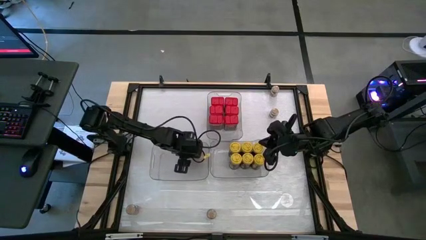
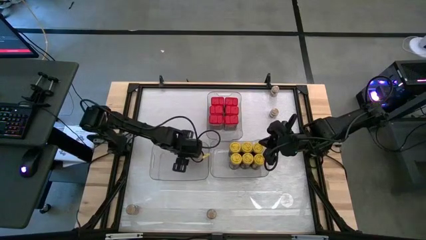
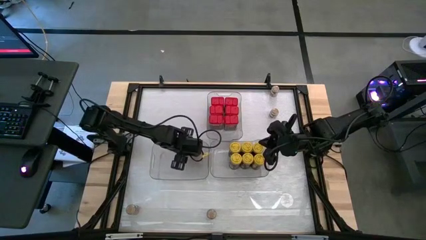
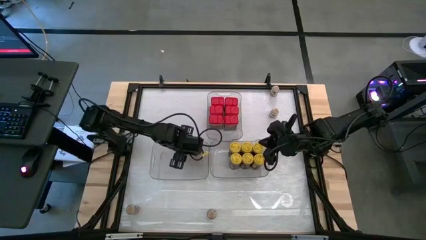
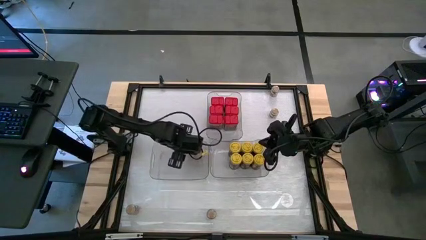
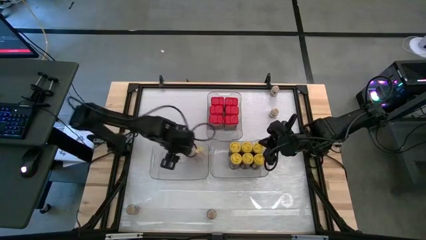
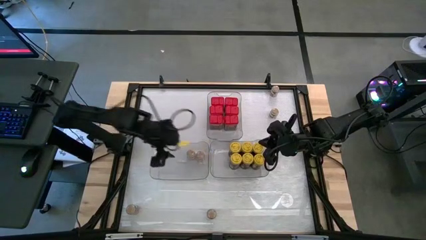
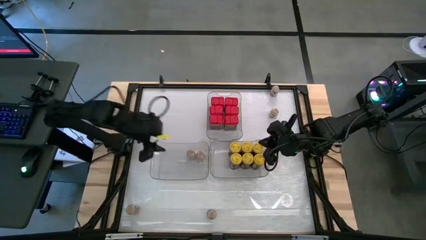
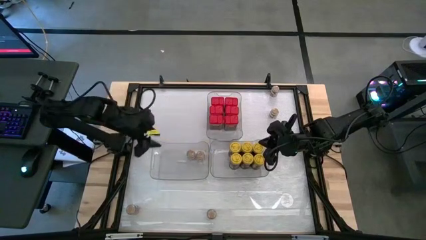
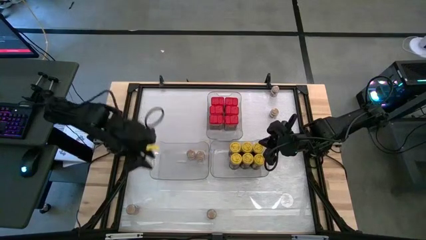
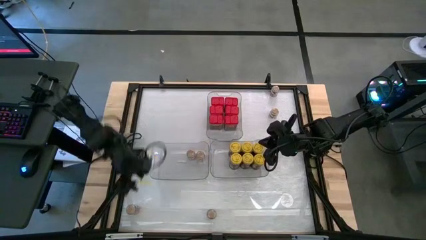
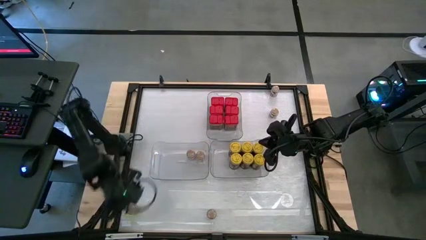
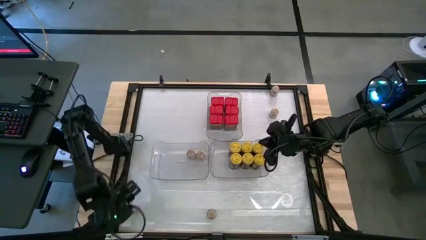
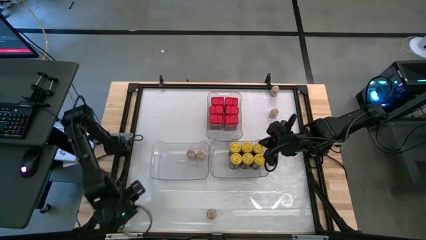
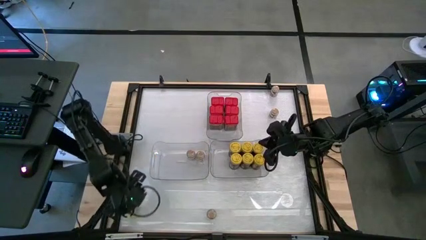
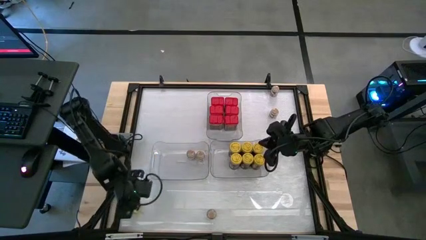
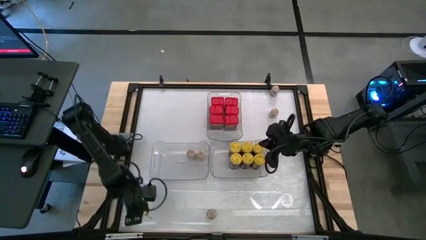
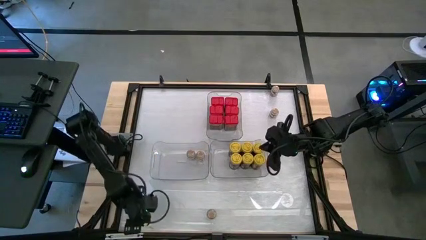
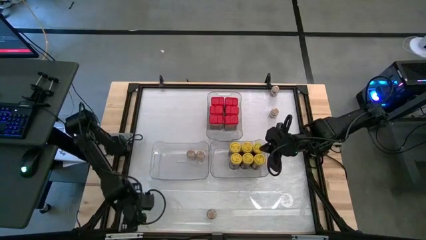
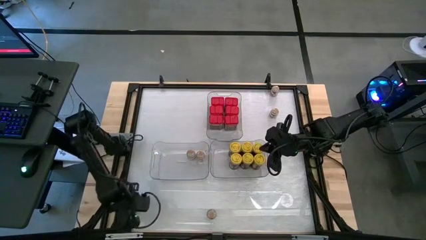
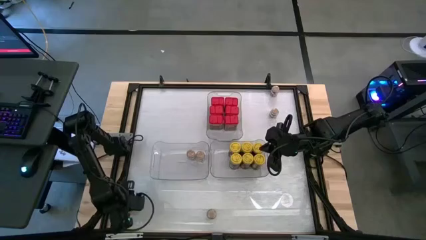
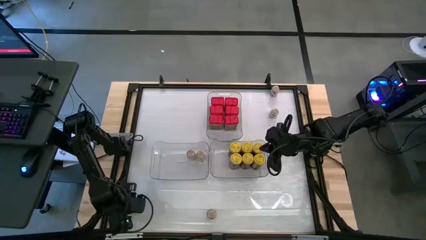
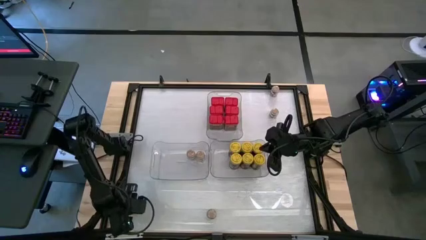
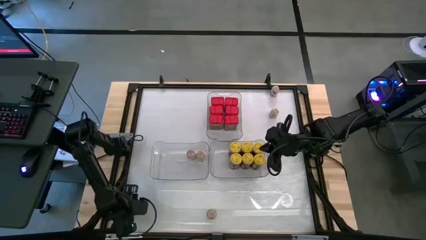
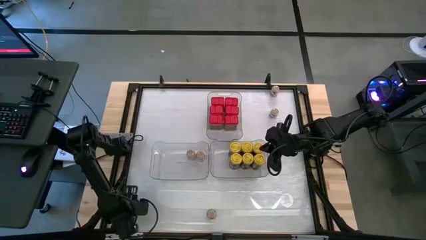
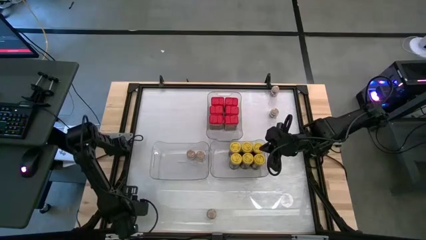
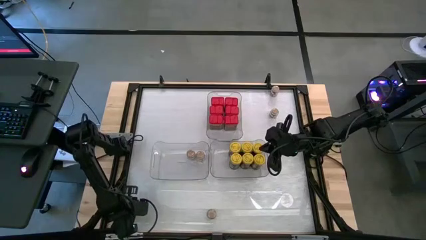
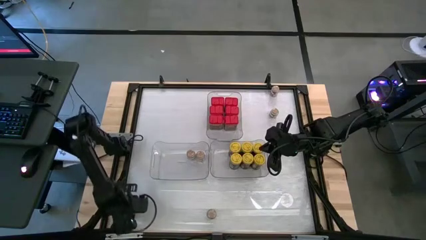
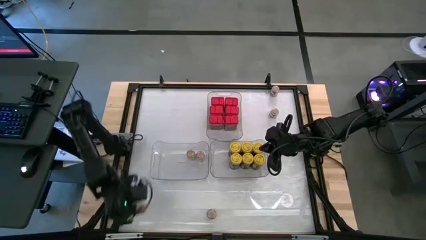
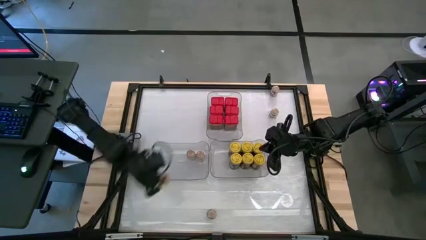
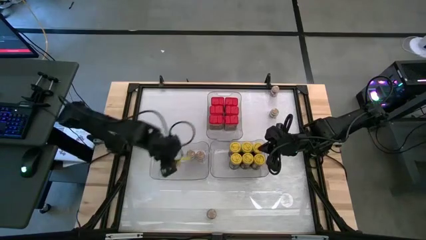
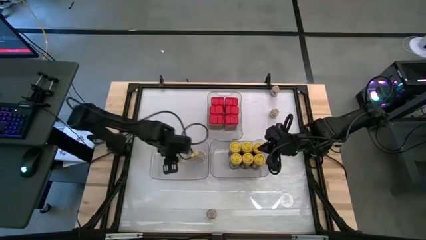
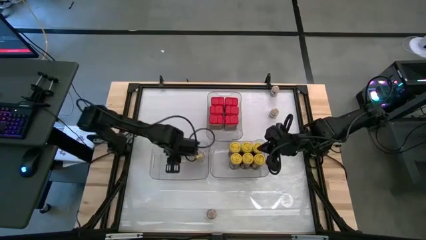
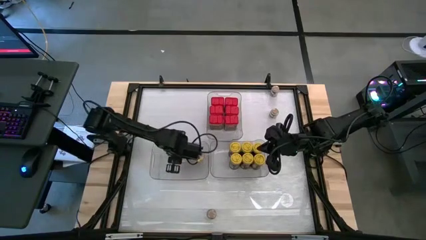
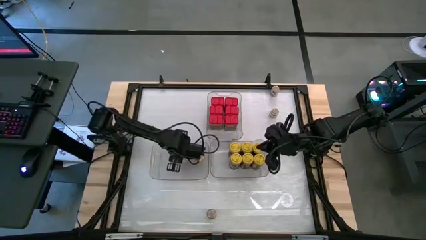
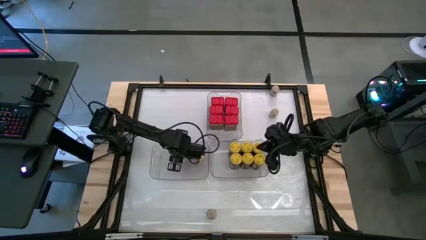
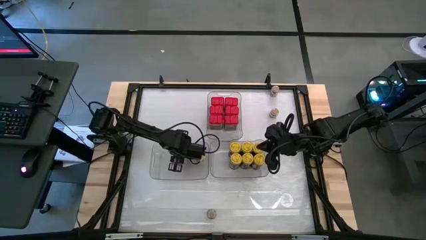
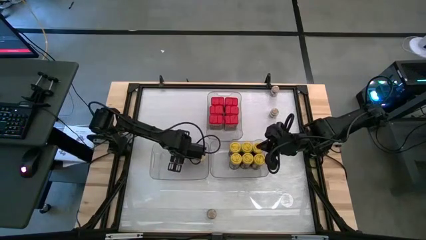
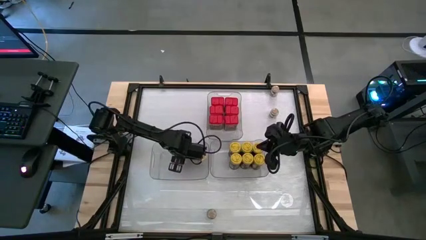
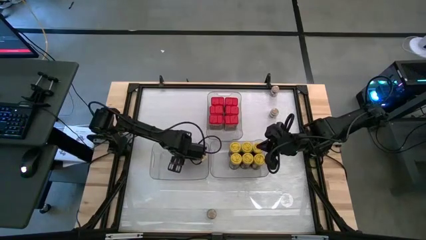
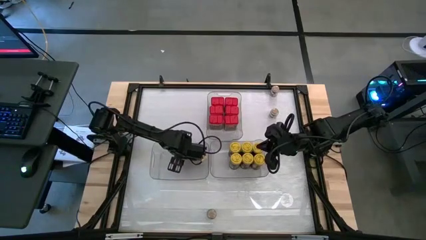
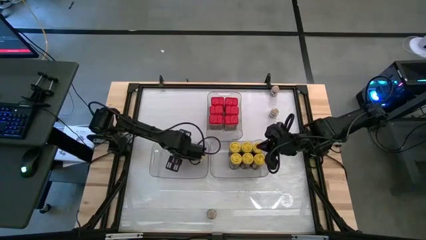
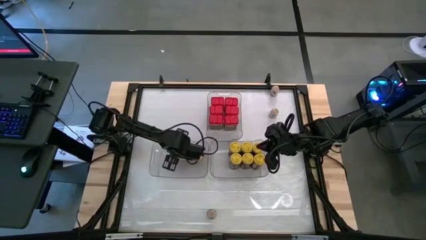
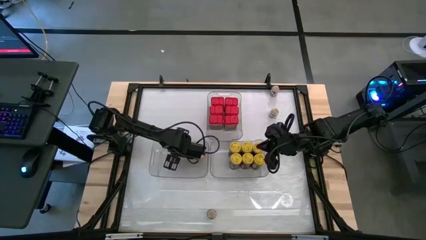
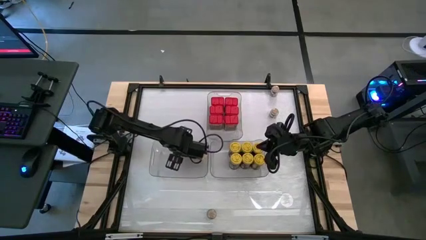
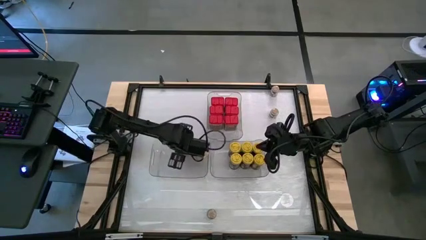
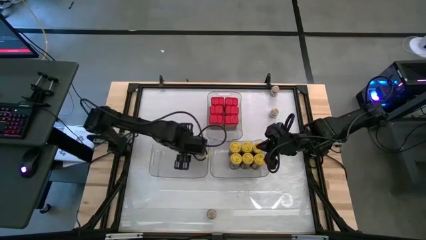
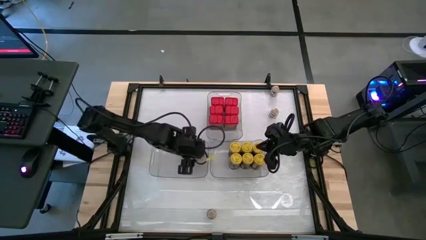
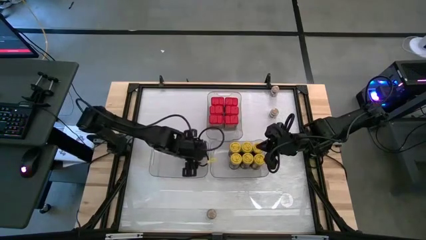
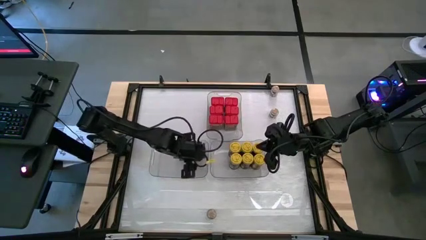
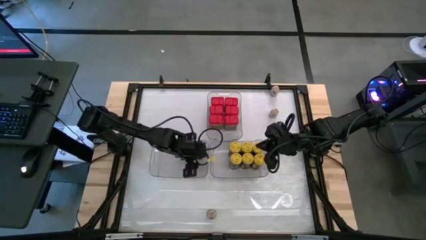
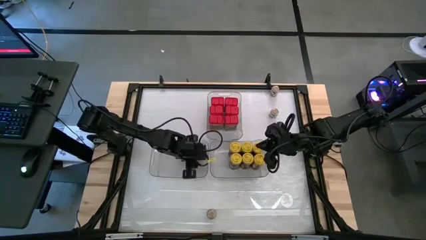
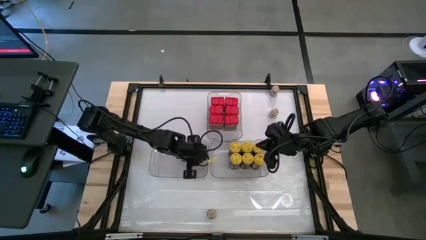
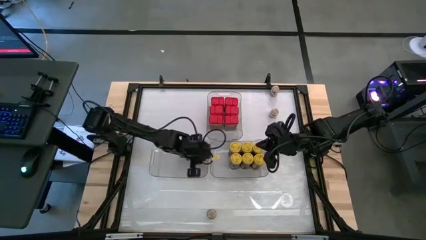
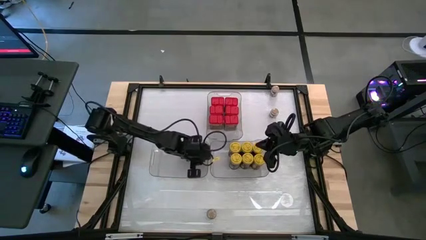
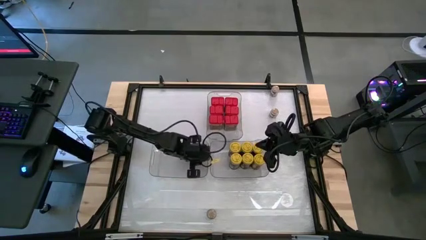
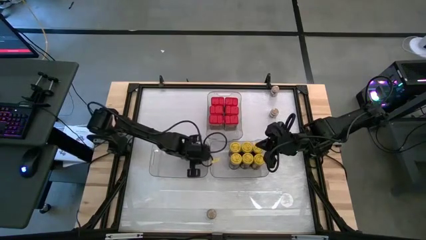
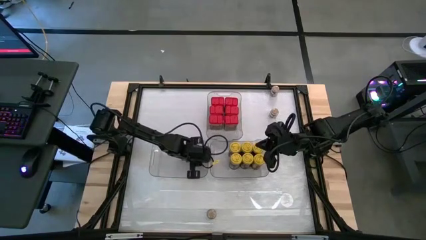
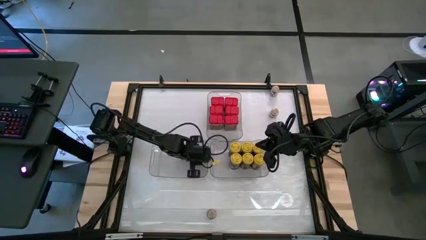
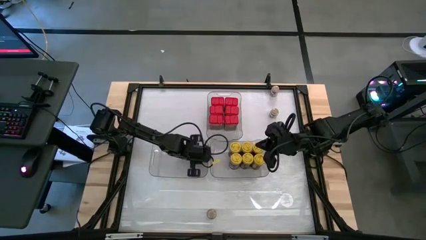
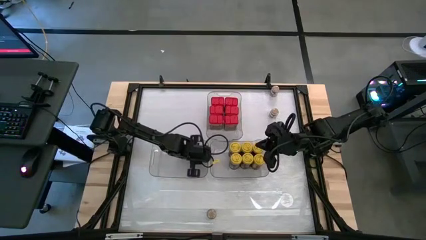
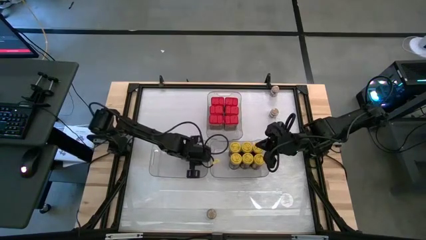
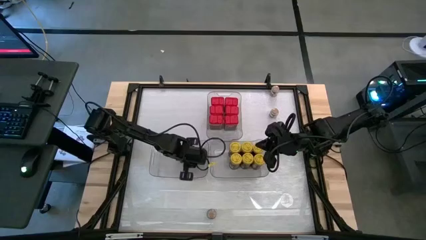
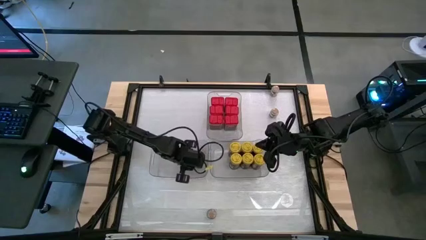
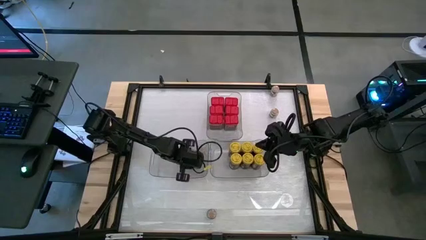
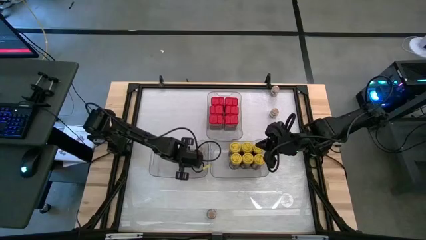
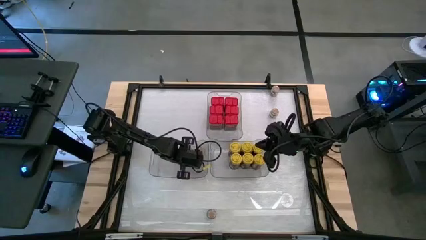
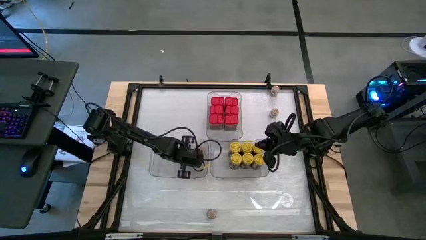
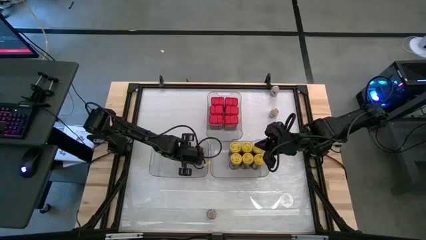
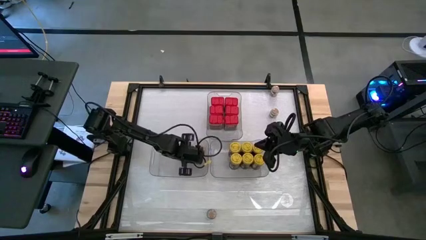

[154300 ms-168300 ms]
Task: Sort spices by type
Put the brown seasoning bottle into the bottom left transparent bin

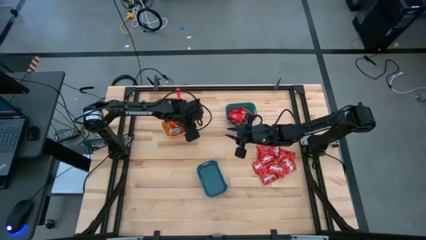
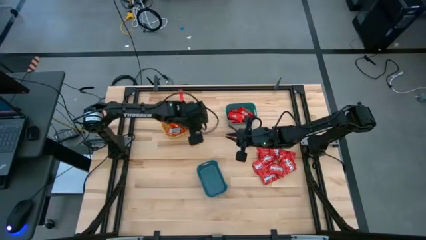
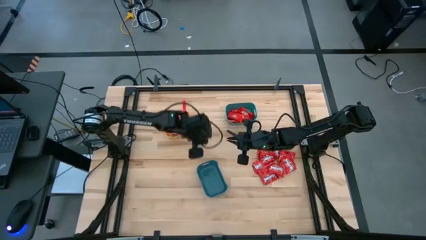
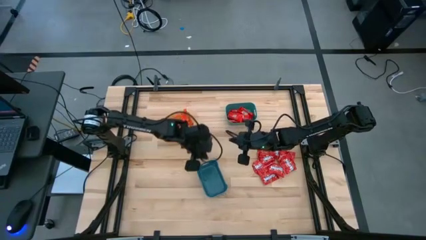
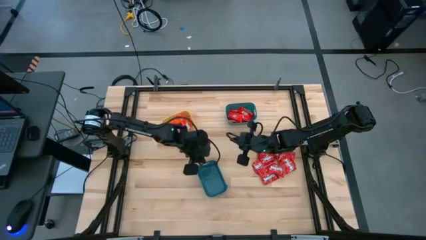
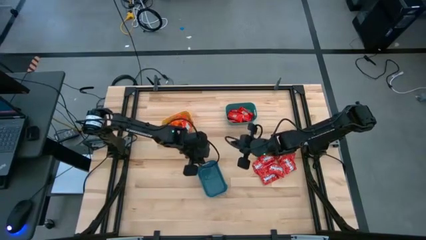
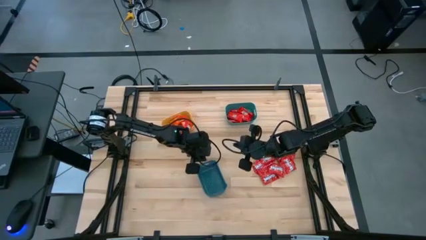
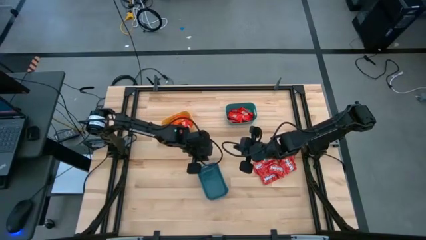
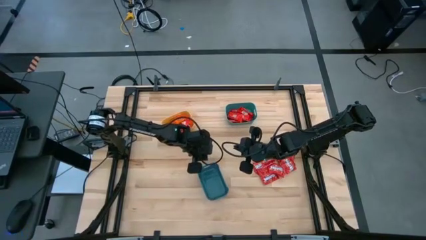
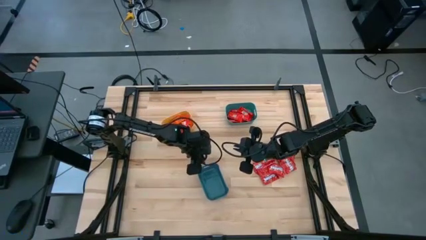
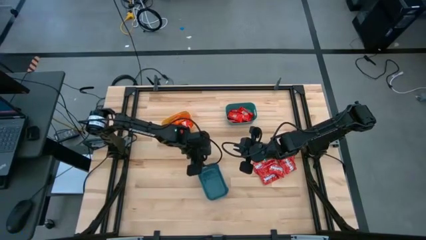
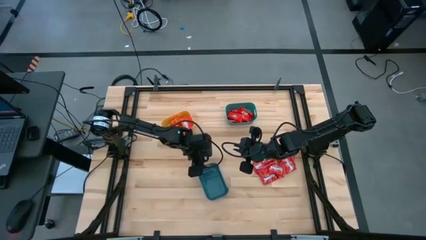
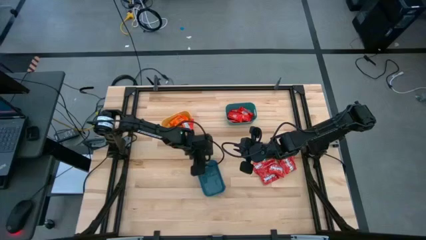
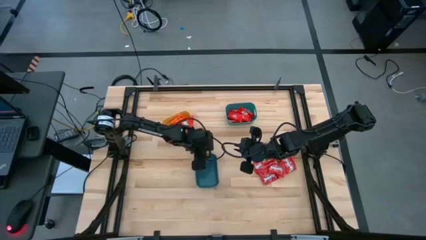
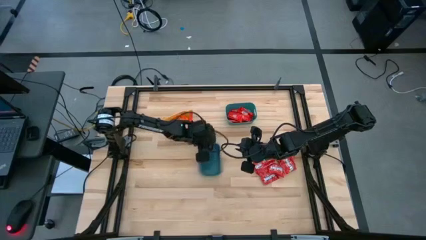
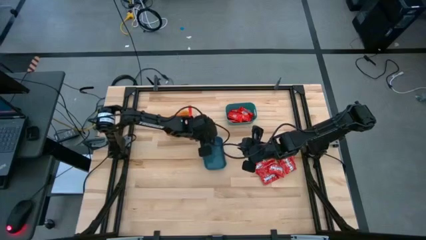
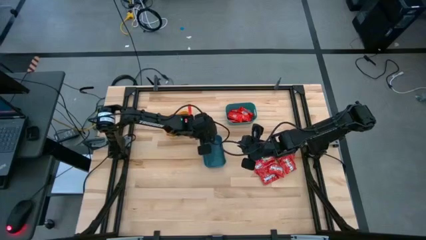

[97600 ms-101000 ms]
Task: Sort candy
Adjust the blue bin
